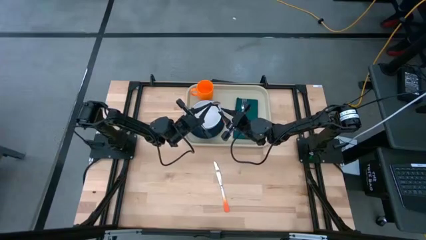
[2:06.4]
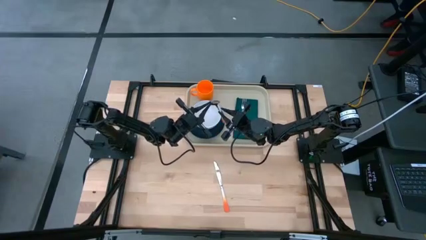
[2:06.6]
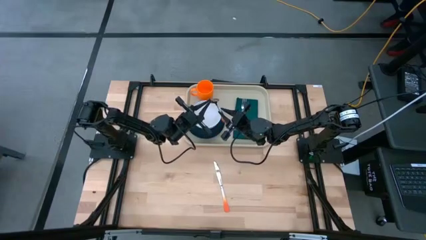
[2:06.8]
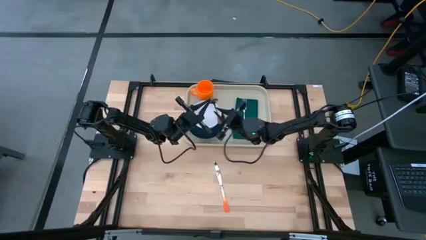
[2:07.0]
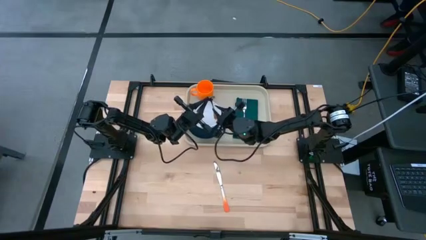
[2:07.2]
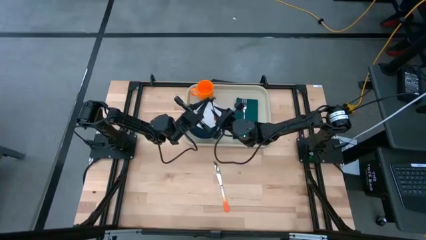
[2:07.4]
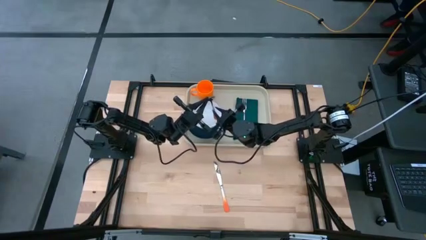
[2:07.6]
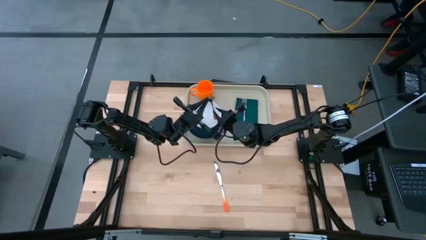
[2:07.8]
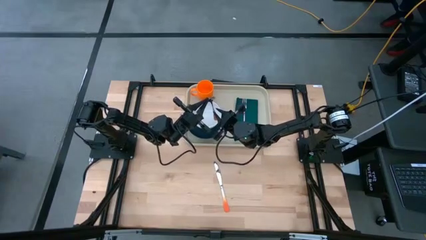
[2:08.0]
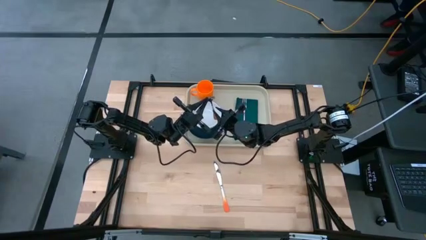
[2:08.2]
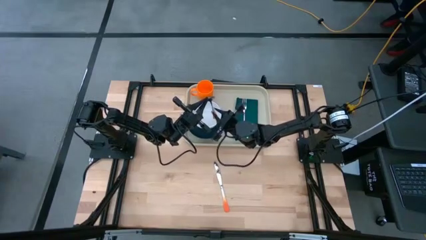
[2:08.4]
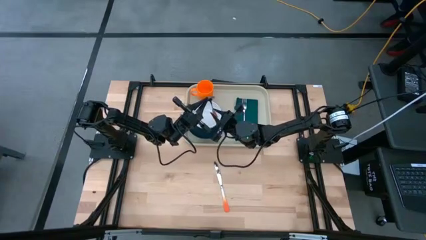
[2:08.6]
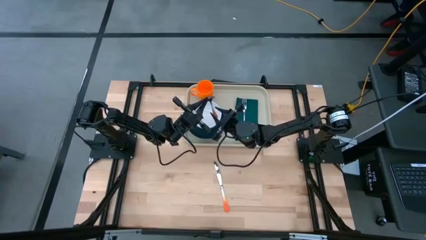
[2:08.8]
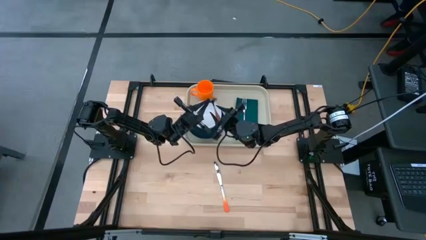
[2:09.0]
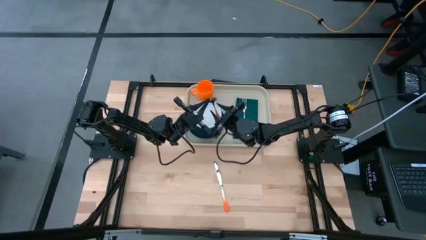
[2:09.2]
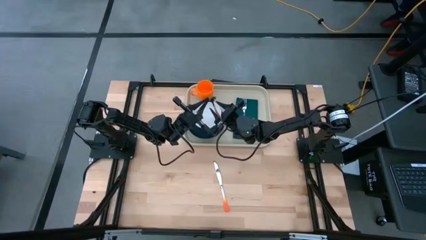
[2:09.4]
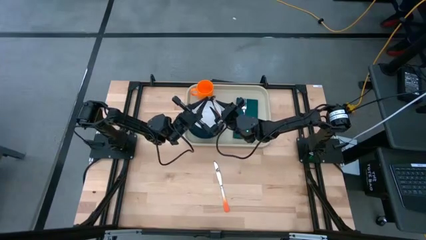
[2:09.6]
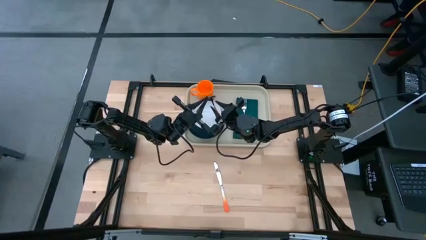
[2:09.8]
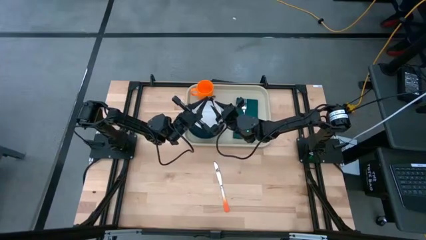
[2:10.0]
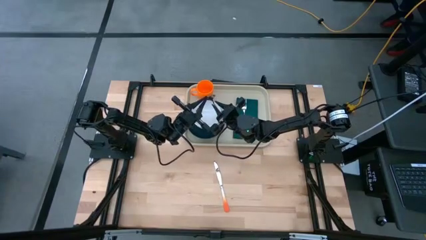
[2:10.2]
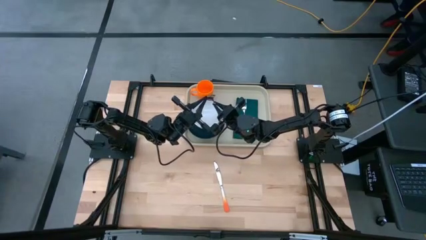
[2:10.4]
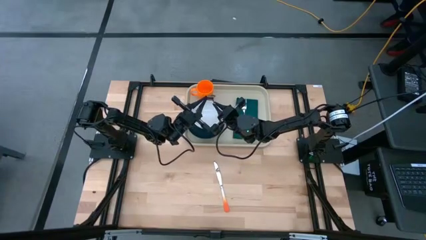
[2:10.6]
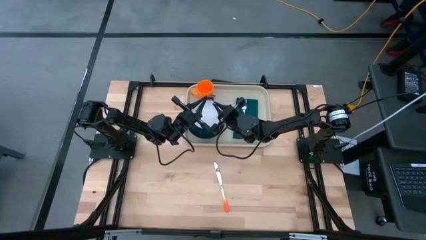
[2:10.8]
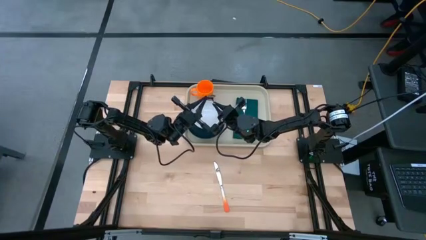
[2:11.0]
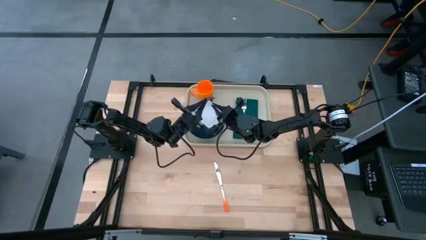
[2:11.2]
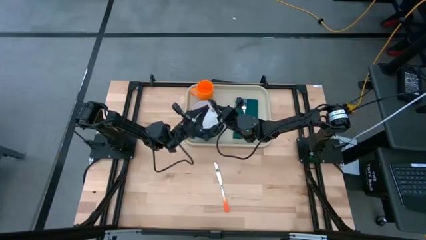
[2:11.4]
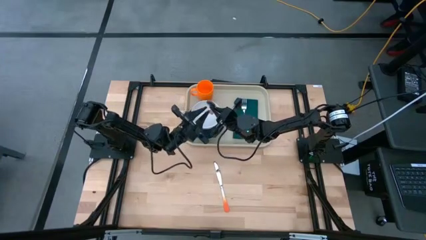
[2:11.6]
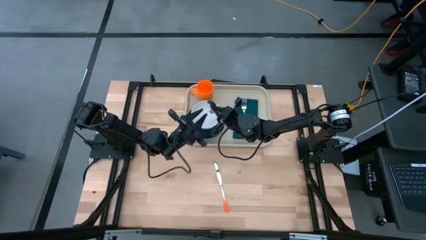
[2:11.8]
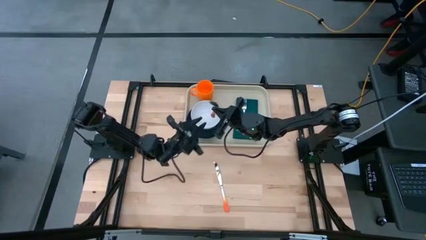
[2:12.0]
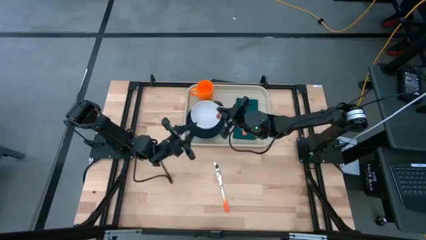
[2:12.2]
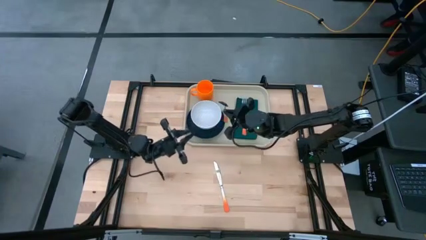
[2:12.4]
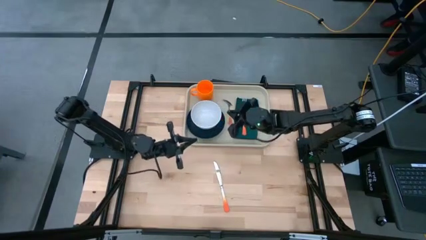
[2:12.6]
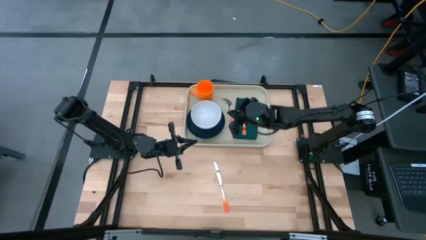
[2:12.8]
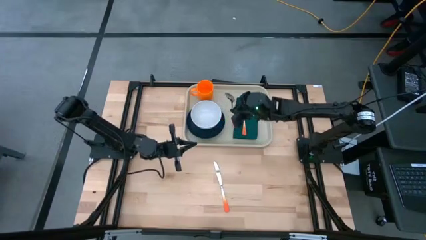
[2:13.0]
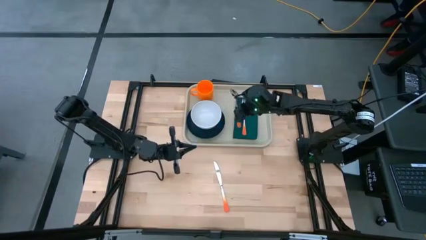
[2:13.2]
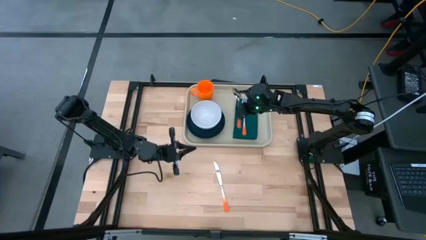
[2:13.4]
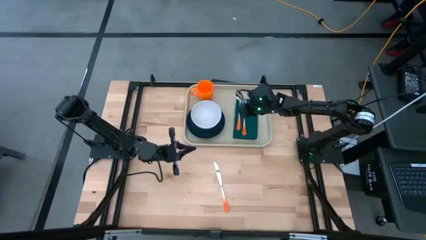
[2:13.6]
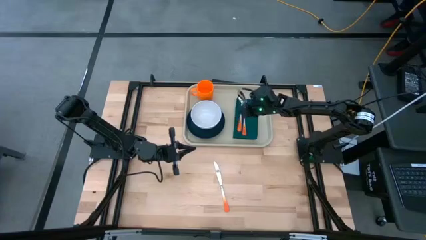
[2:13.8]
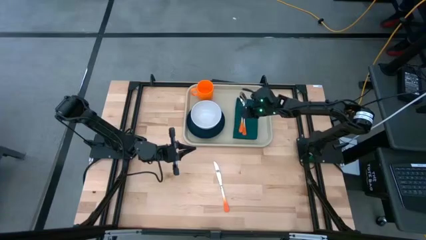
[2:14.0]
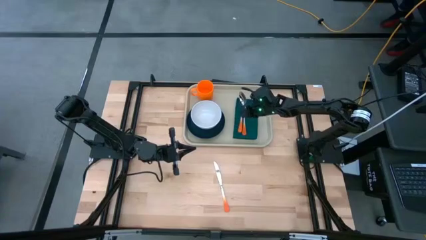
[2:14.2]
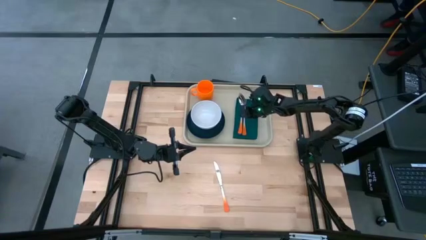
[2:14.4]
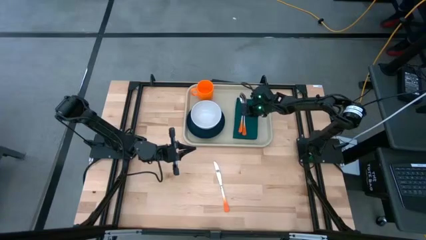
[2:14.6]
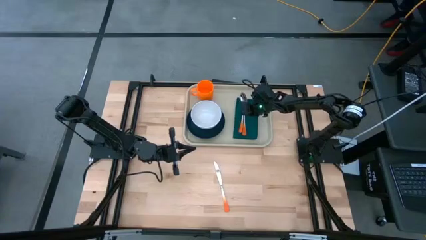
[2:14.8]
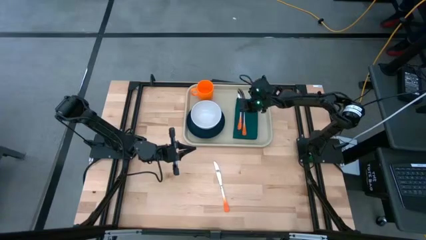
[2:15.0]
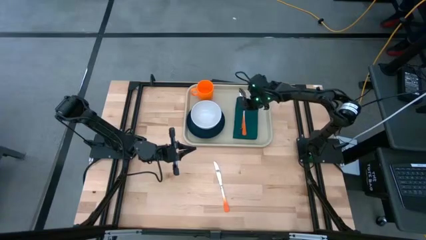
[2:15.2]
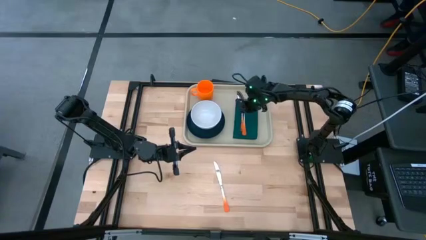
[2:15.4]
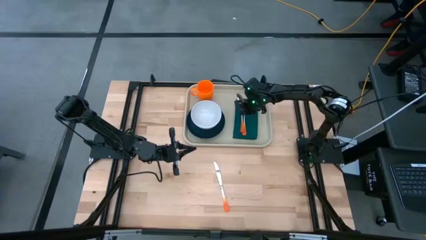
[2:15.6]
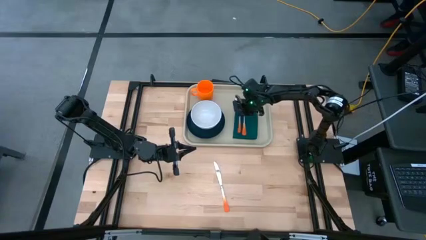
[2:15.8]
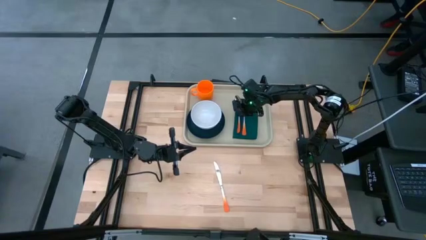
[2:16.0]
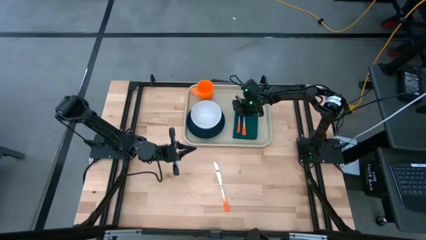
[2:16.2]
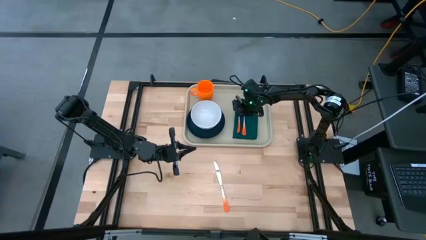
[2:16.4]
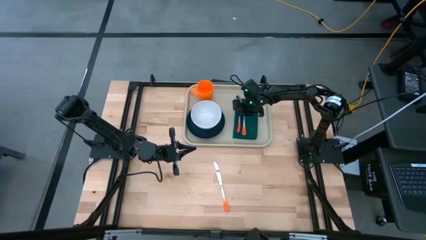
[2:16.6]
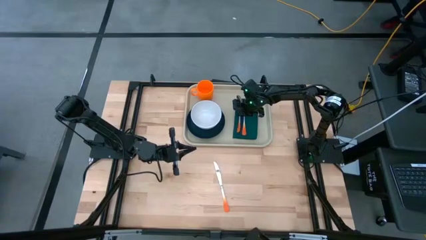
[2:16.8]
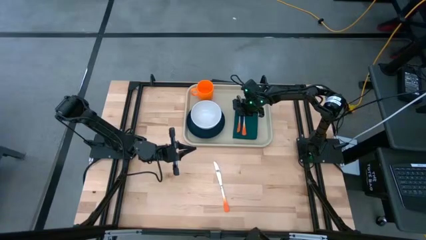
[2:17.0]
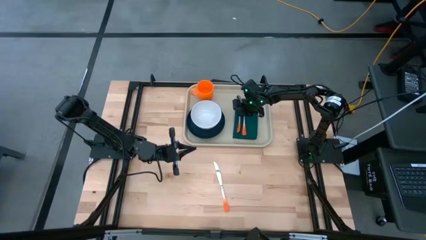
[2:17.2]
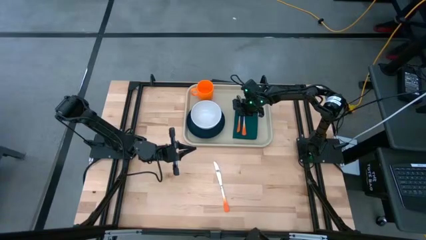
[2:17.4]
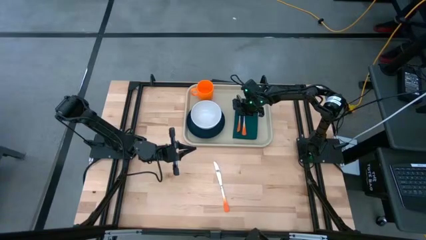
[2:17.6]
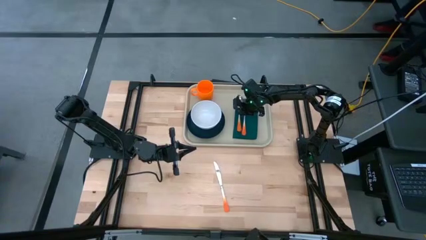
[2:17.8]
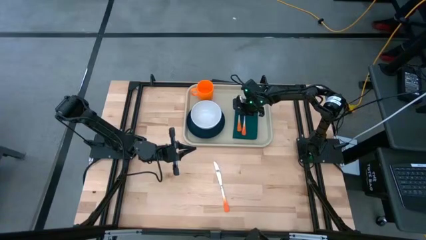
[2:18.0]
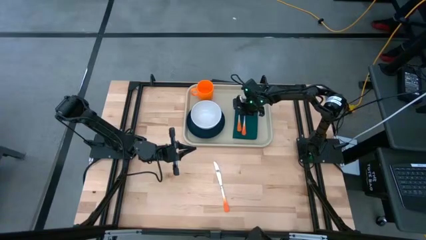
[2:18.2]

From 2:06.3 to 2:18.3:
Task: Set up tray
Put the orange spoon on top of the green napkin to the left of the orange fork on the gray serving tray

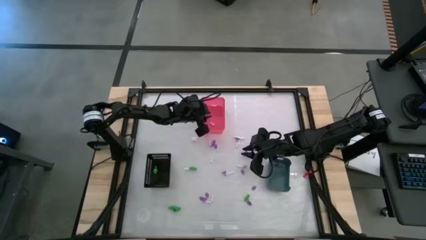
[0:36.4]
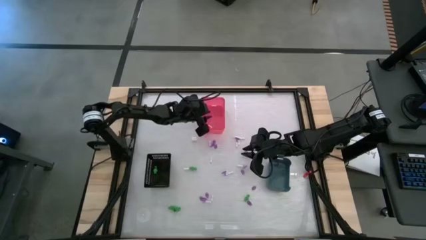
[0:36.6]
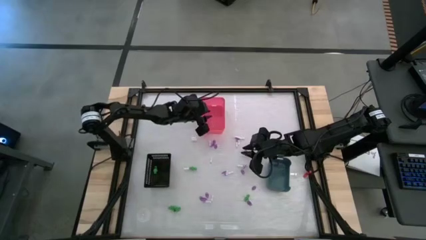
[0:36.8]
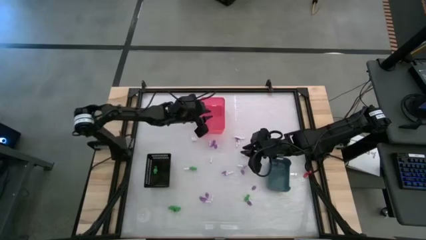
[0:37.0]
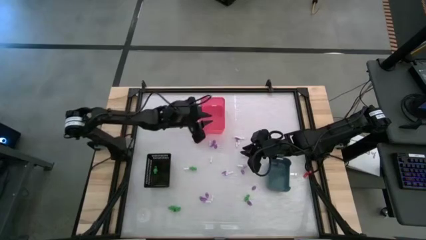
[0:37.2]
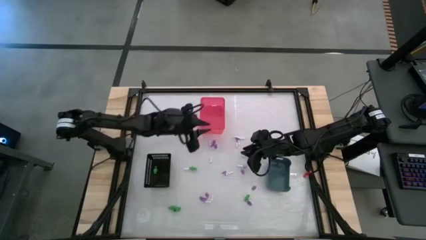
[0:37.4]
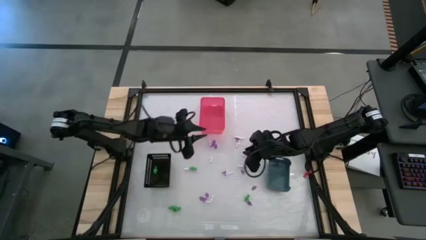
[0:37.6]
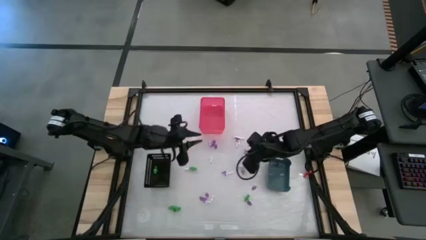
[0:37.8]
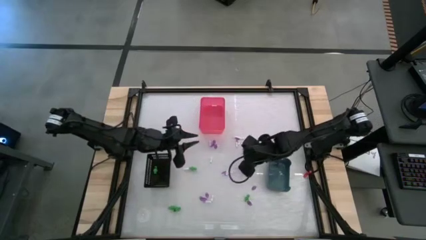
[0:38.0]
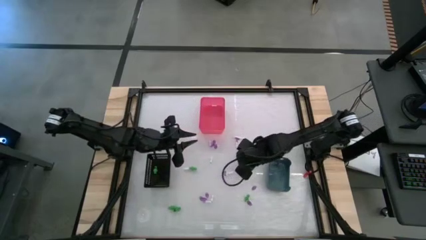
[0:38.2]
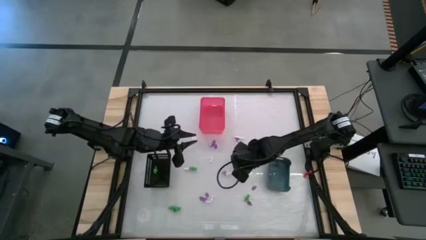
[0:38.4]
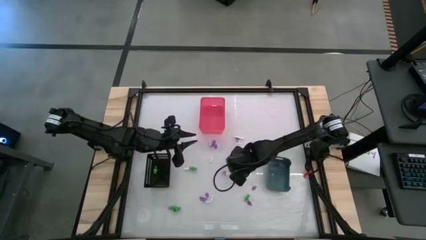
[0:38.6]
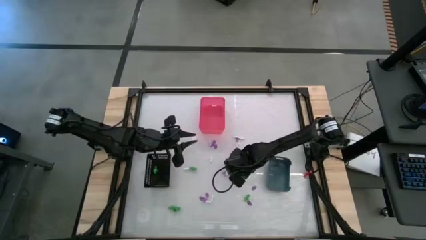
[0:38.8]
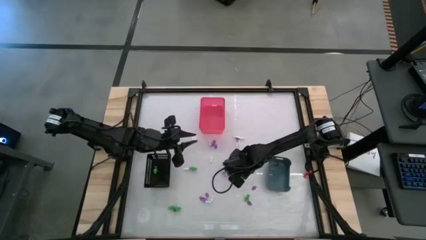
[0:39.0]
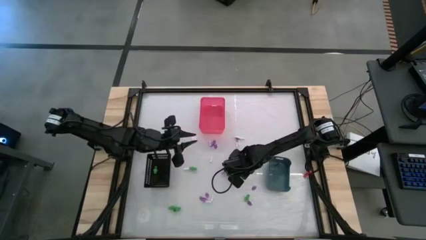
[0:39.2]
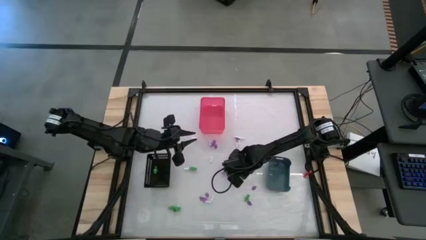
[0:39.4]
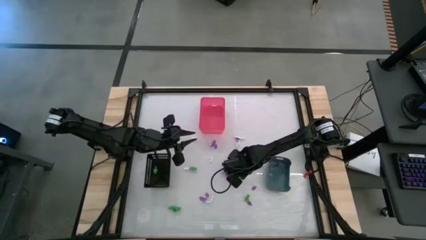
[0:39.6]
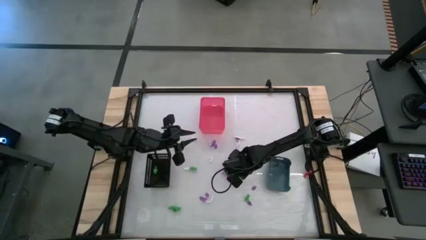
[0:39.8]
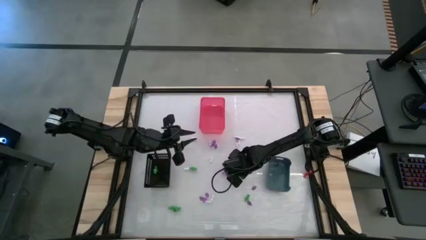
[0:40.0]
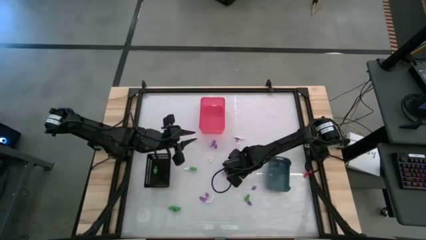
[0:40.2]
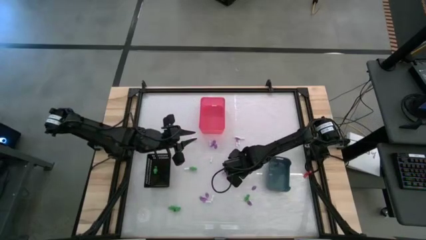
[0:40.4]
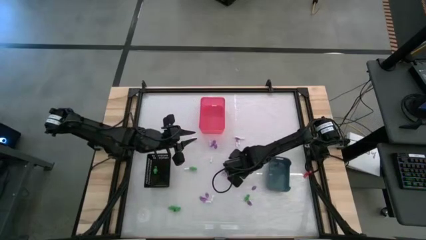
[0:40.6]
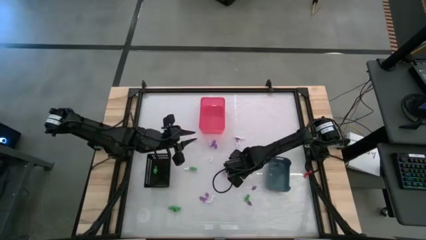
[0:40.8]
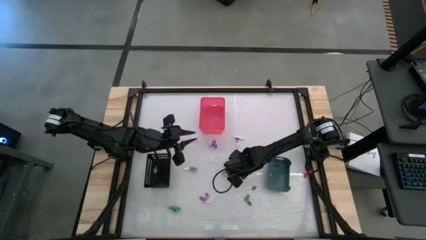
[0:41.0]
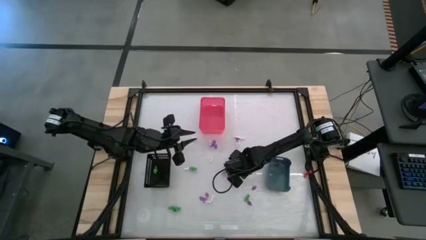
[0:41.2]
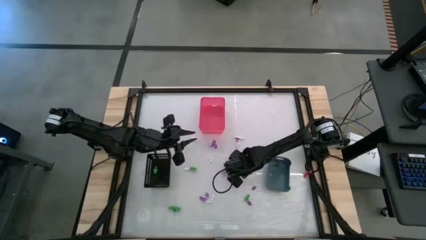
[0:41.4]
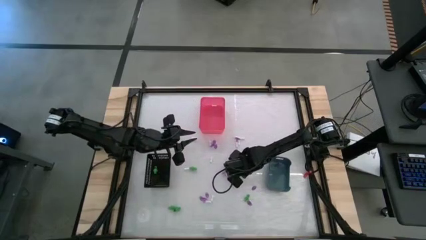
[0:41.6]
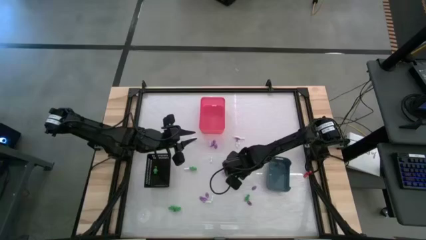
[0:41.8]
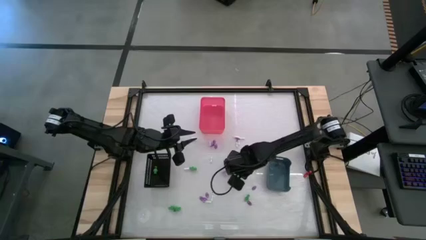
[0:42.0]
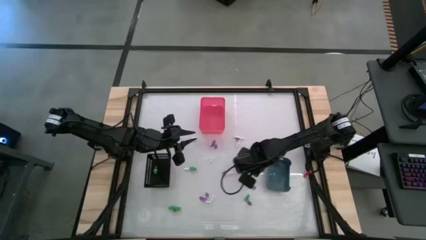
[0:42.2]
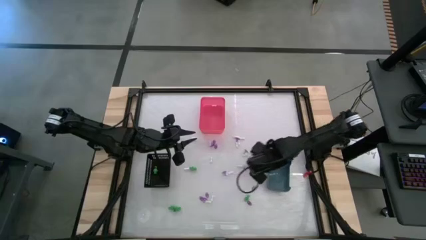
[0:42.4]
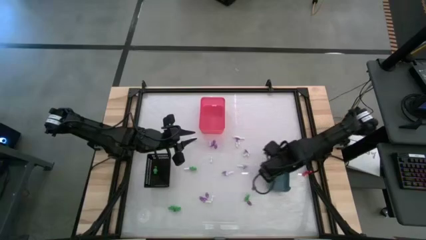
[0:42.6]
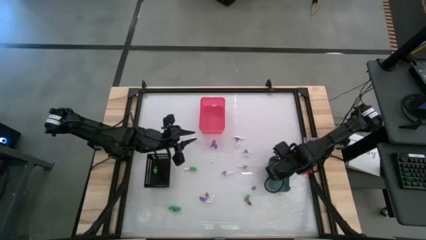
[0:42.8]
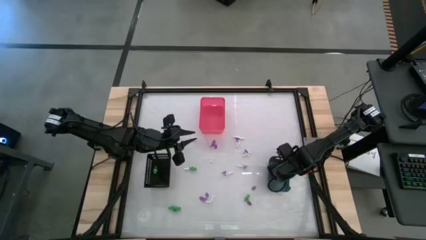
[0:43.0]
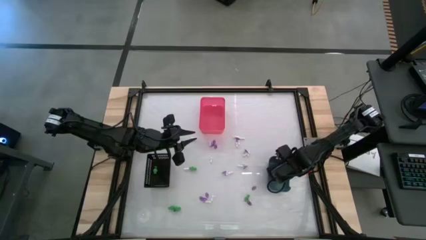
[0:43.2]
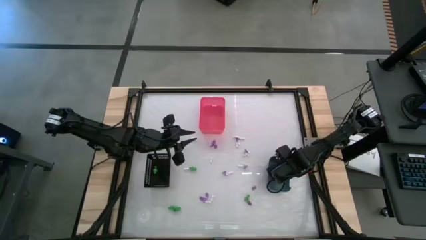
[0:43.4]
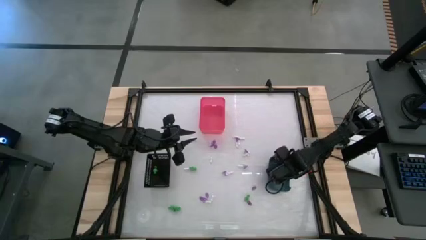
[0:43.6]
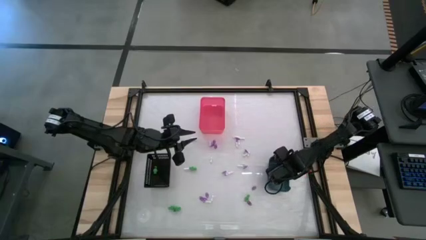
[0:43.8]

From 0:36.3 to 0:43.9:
Task: Sort Halloween decoration
Put the witch hat toy into the blue bin
